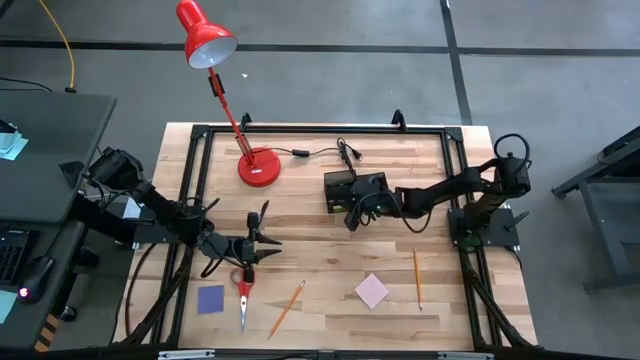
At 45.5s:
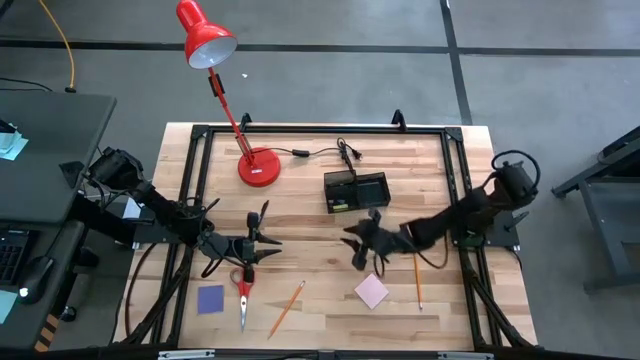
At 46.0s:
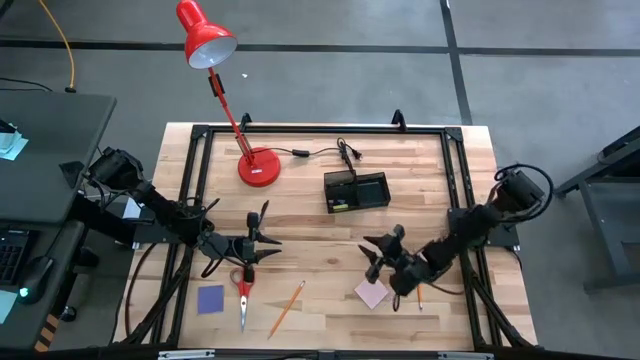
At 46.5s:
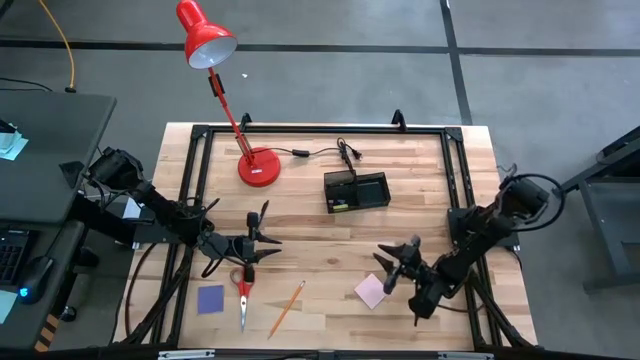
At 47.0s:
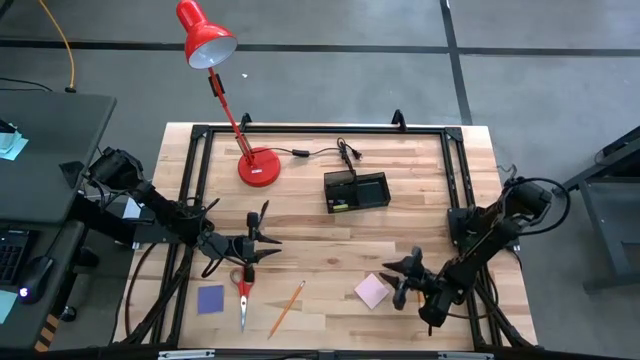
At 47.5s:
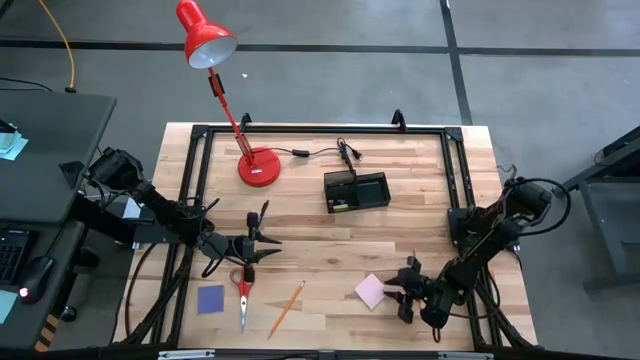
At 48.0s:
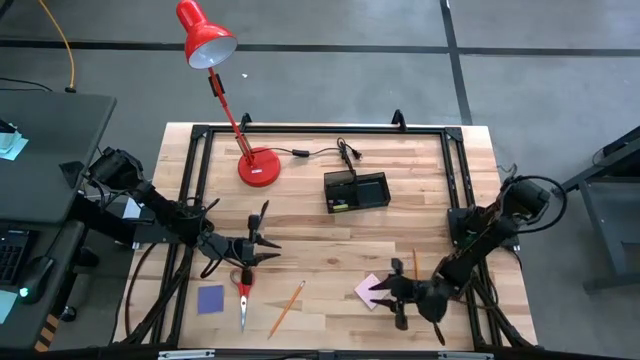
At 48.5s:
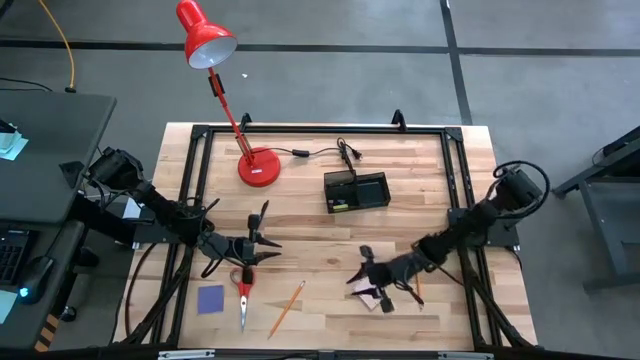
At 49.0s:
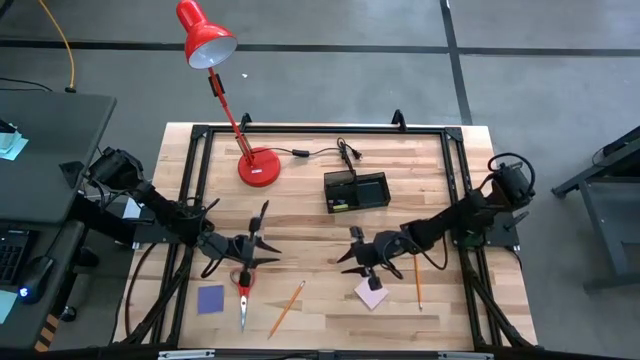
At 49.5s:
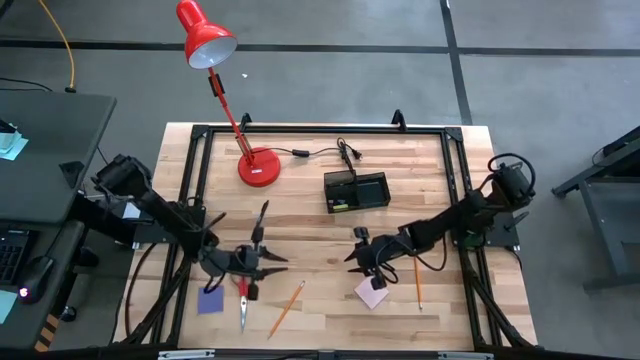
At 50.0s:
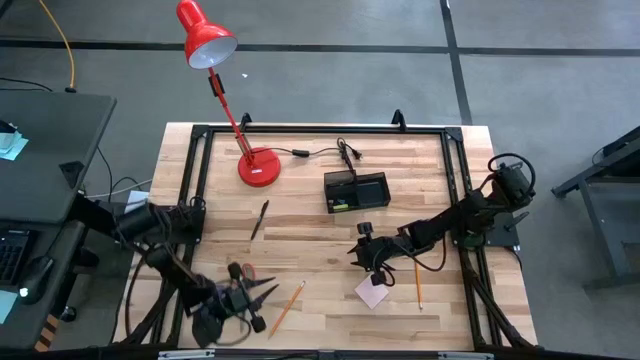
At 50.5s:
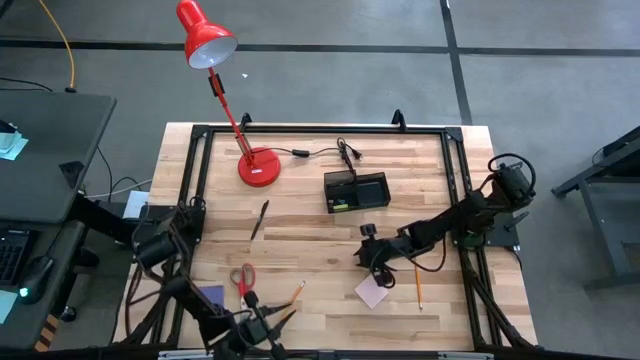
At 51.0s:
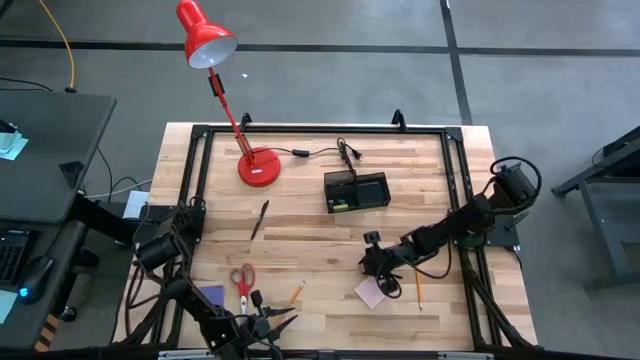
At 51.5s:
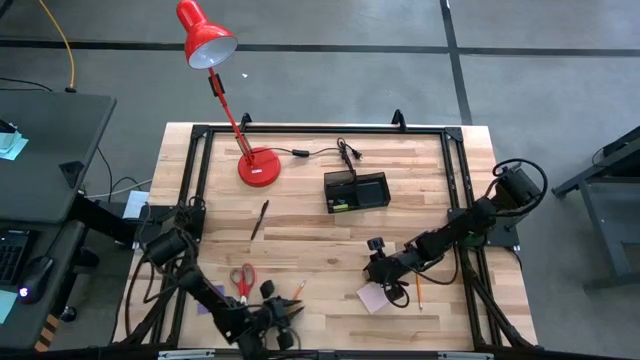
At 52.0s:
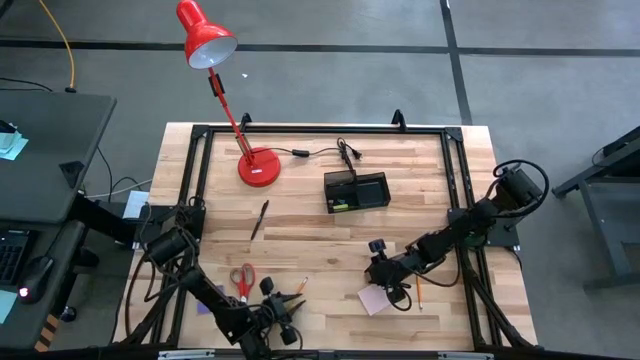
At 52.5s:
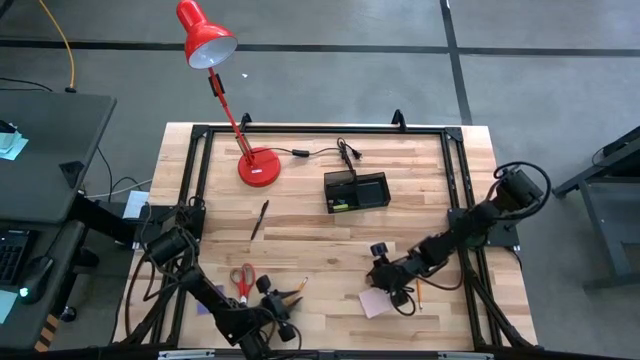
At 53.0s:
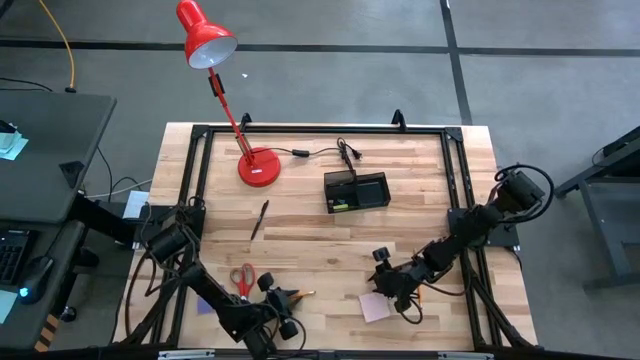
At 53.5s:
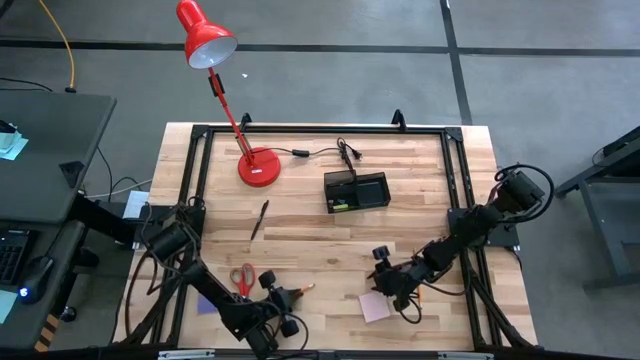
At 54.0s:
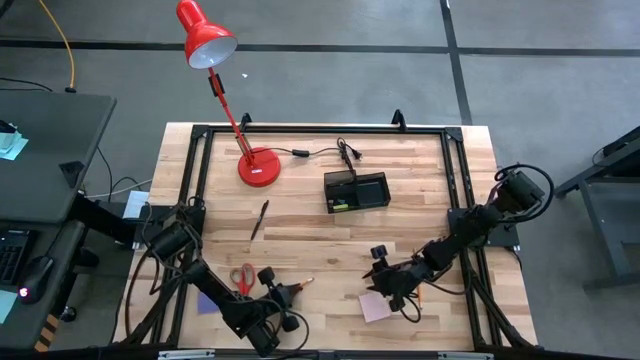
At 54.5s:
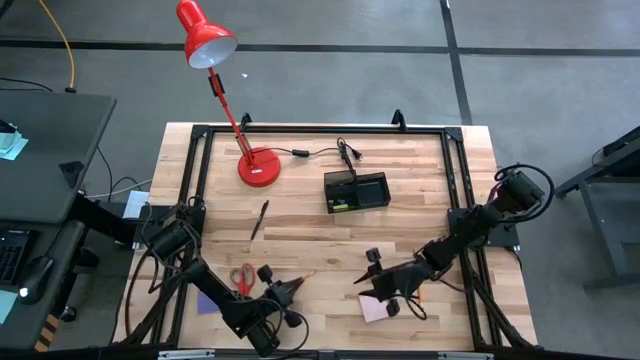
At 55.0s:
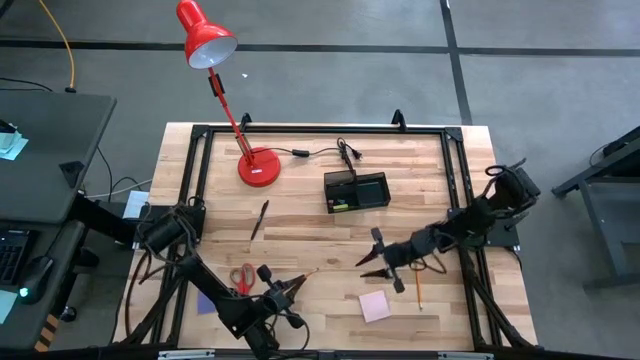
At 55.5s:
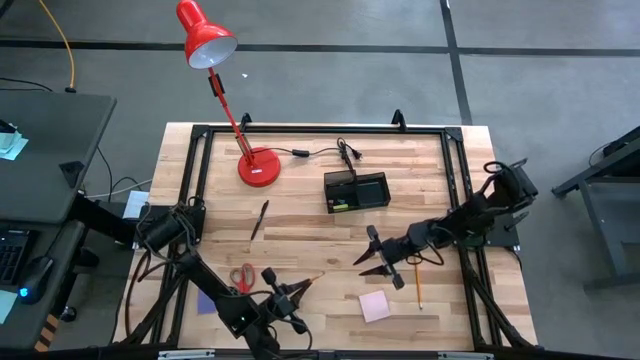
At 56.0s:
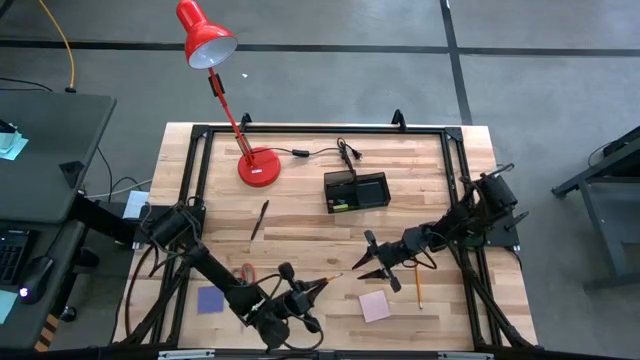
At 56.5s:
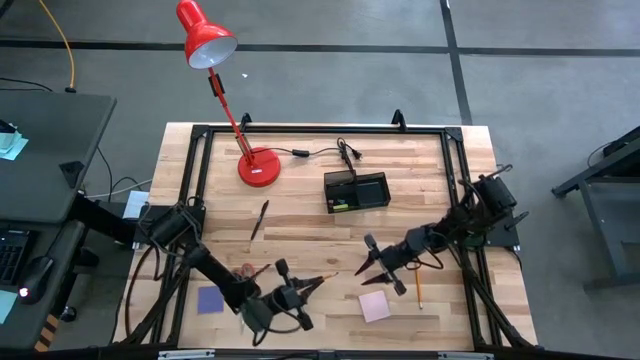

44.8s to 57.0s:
Task: Pick and place office supplies into organizer
Put the left orange pencil into the desk organizer
